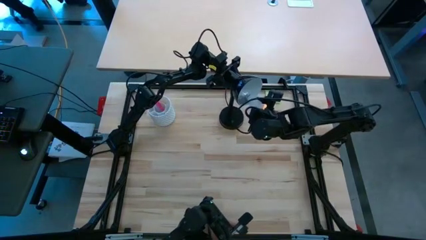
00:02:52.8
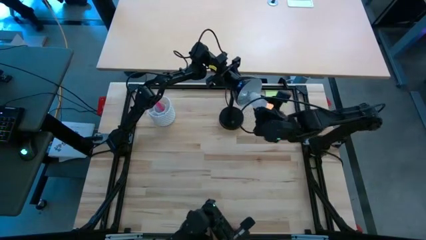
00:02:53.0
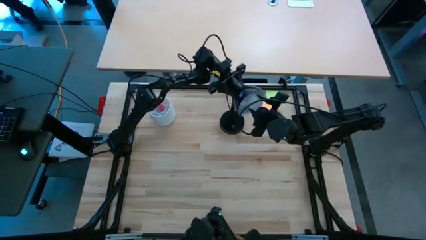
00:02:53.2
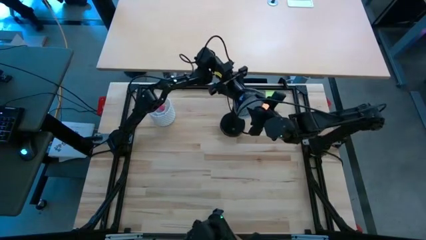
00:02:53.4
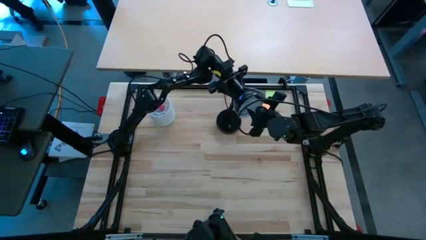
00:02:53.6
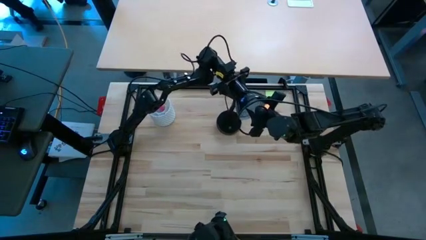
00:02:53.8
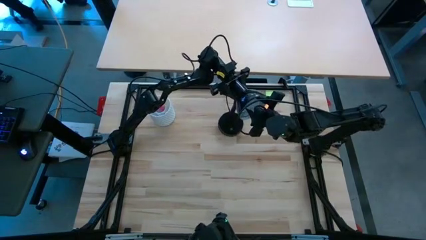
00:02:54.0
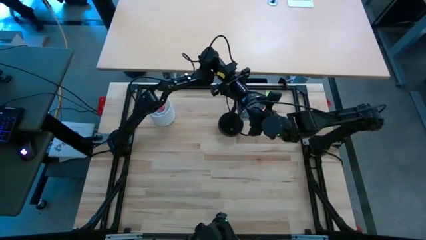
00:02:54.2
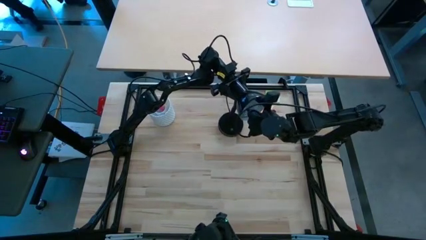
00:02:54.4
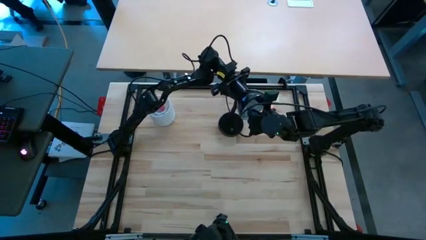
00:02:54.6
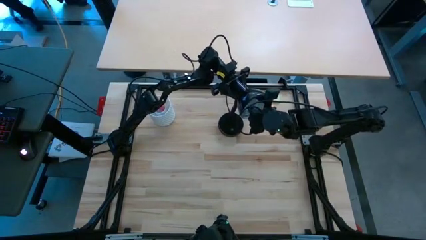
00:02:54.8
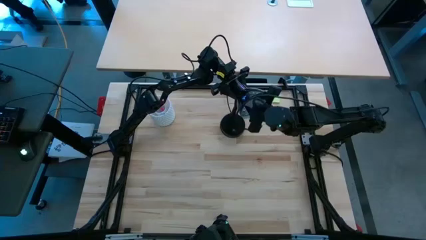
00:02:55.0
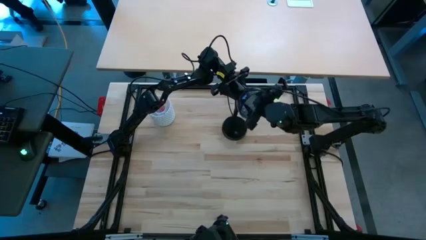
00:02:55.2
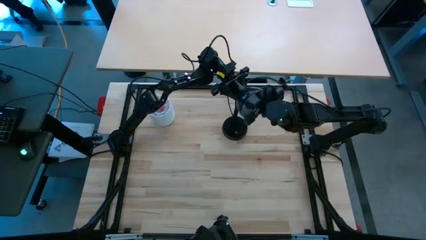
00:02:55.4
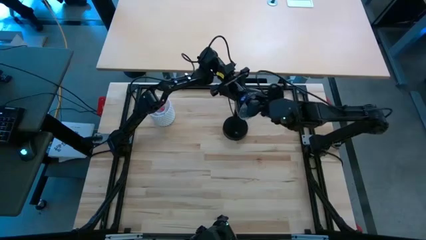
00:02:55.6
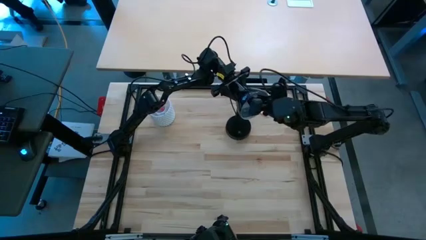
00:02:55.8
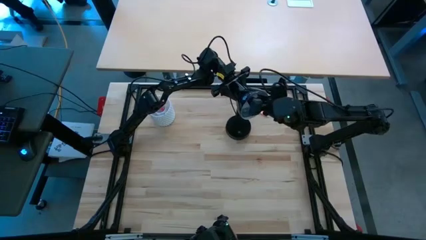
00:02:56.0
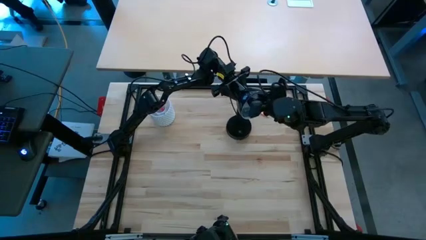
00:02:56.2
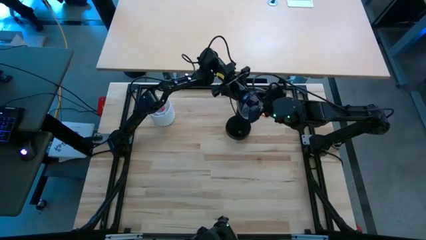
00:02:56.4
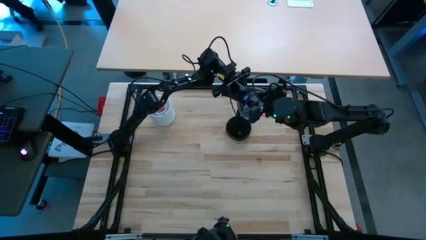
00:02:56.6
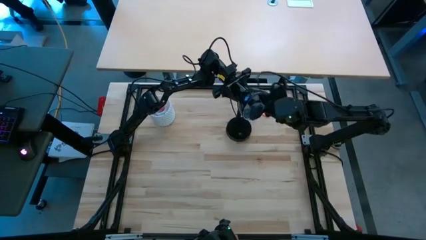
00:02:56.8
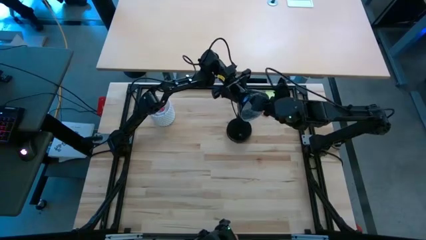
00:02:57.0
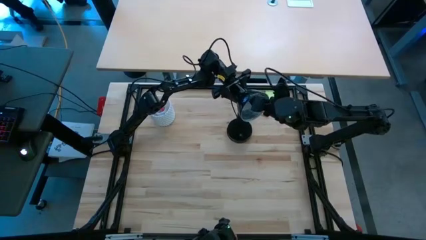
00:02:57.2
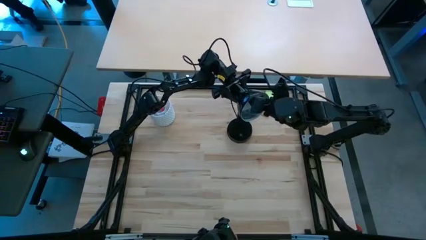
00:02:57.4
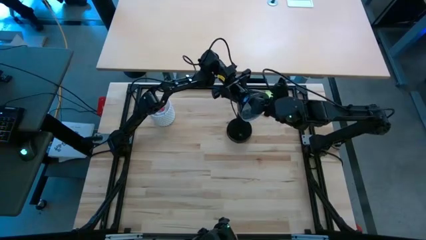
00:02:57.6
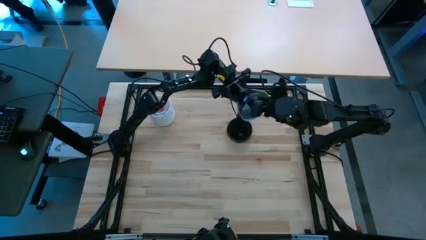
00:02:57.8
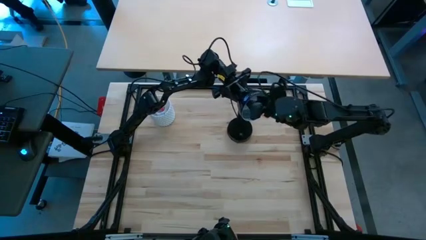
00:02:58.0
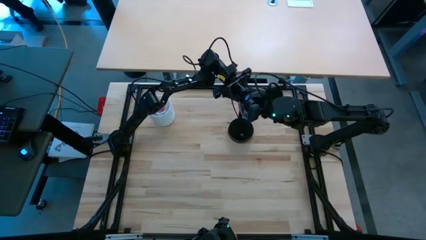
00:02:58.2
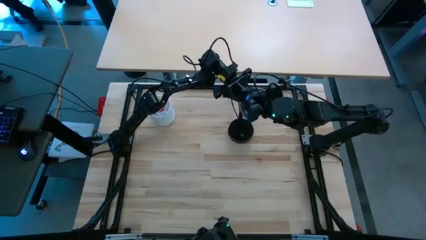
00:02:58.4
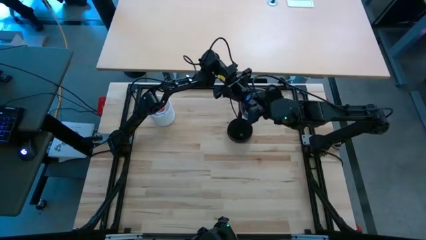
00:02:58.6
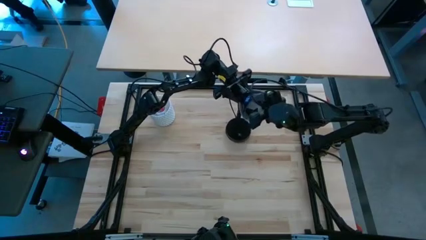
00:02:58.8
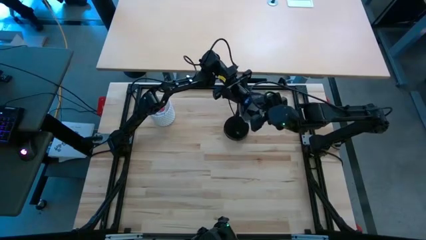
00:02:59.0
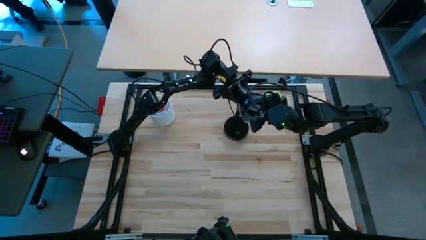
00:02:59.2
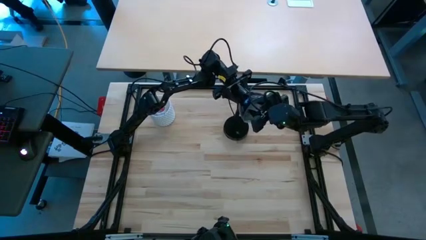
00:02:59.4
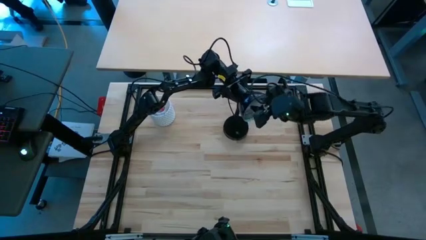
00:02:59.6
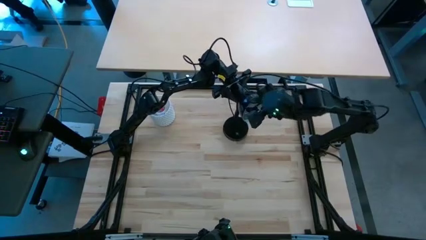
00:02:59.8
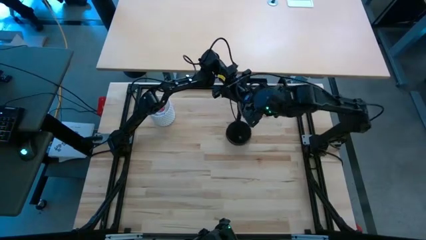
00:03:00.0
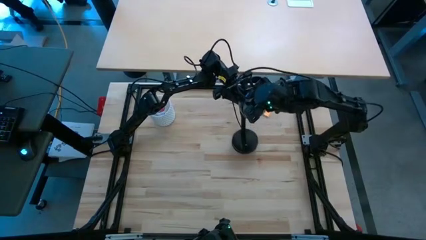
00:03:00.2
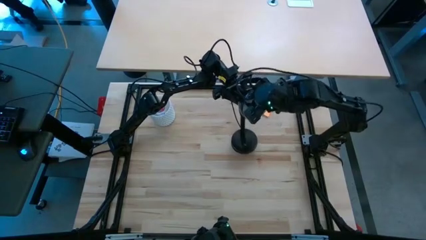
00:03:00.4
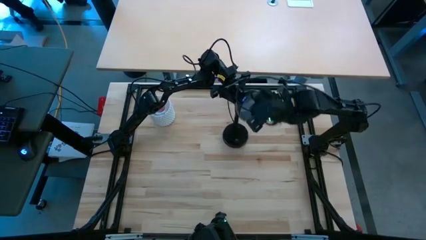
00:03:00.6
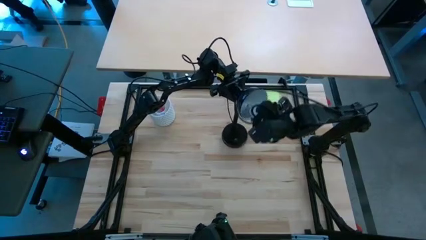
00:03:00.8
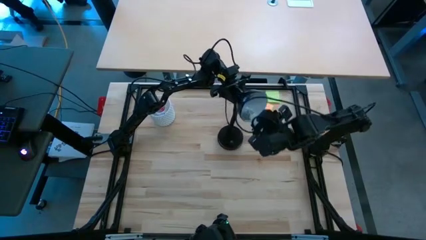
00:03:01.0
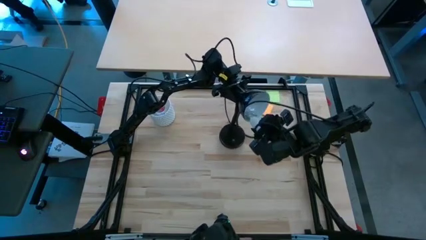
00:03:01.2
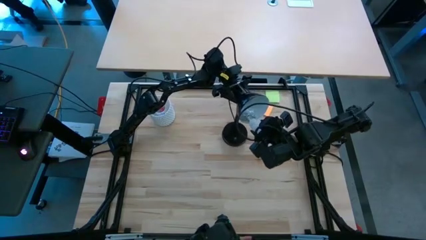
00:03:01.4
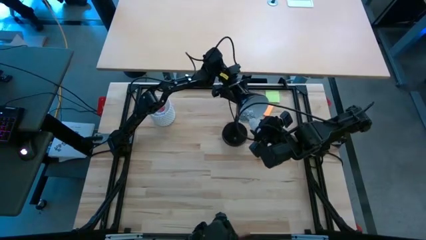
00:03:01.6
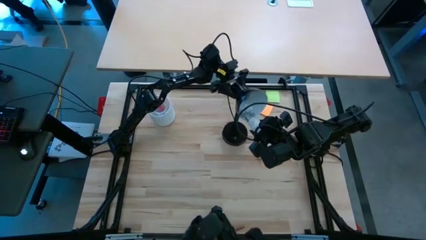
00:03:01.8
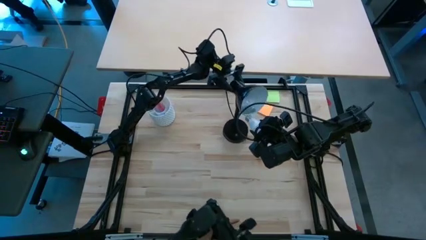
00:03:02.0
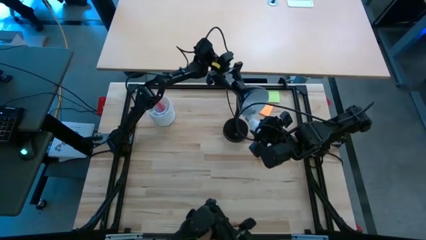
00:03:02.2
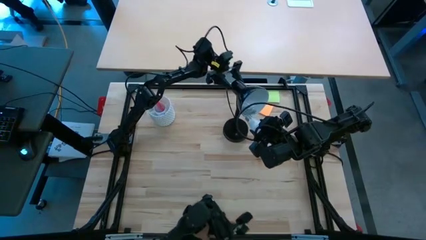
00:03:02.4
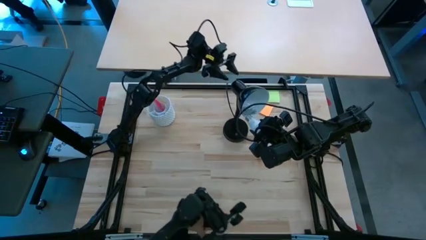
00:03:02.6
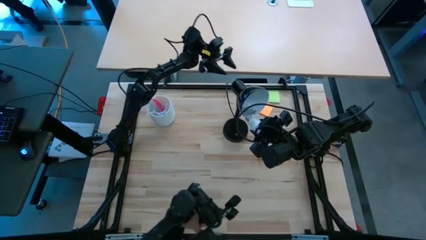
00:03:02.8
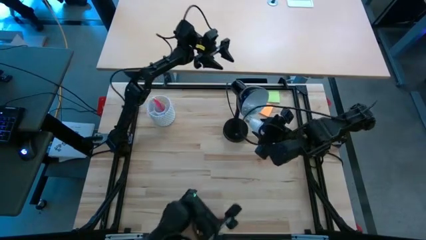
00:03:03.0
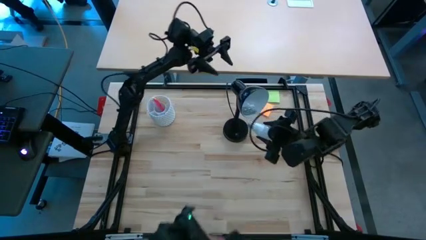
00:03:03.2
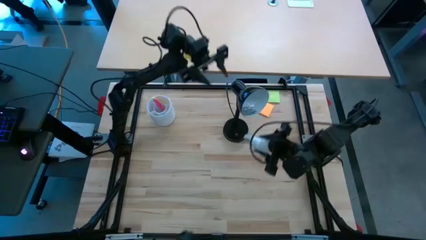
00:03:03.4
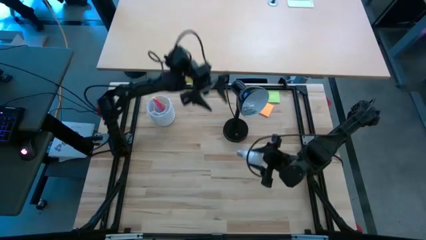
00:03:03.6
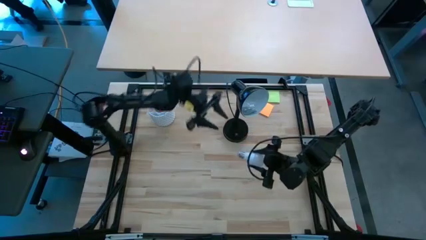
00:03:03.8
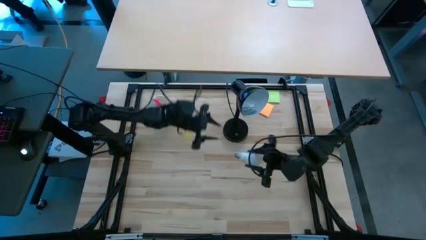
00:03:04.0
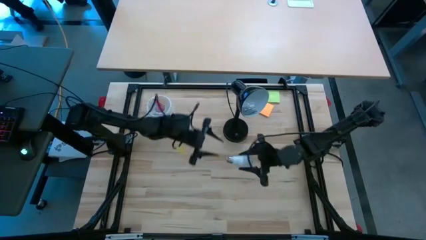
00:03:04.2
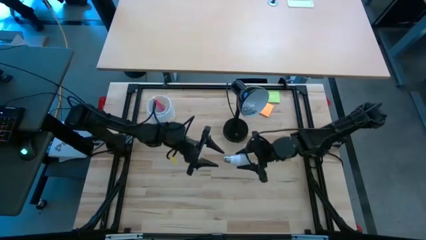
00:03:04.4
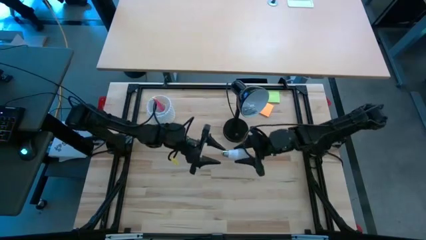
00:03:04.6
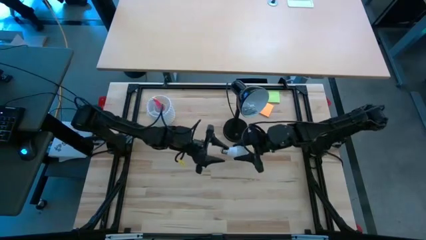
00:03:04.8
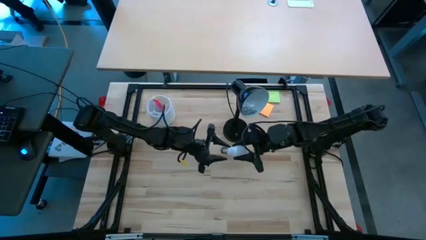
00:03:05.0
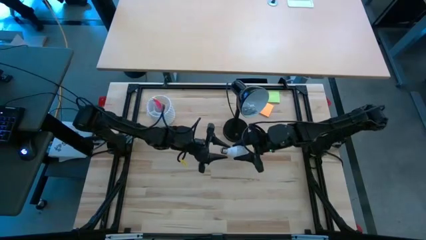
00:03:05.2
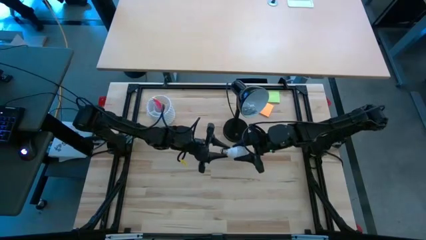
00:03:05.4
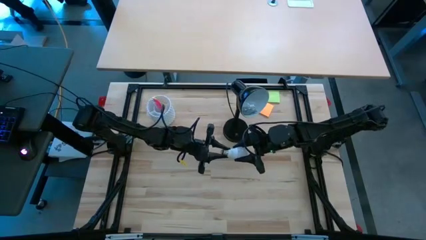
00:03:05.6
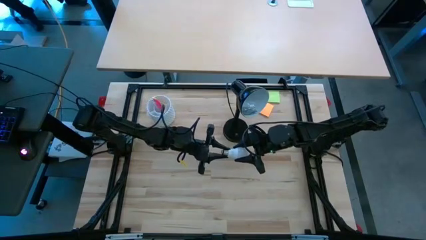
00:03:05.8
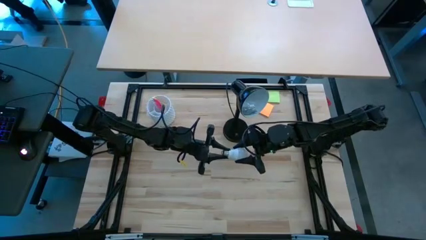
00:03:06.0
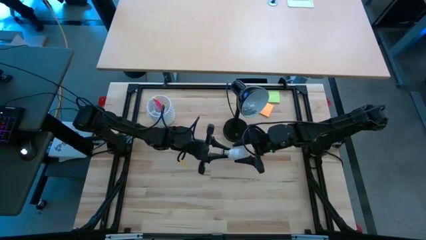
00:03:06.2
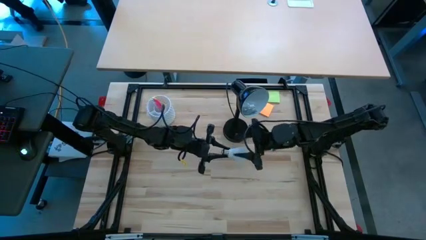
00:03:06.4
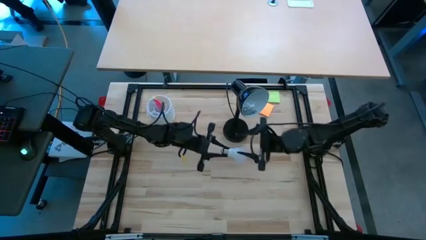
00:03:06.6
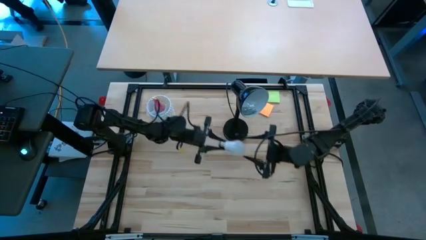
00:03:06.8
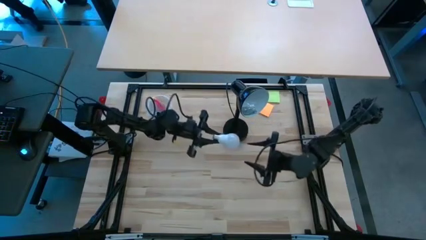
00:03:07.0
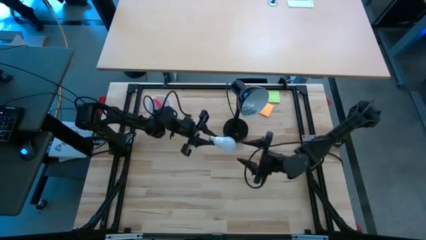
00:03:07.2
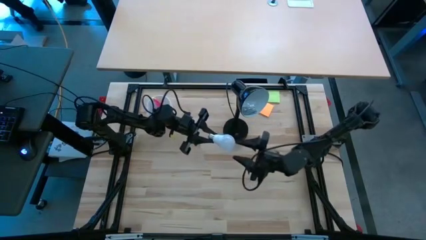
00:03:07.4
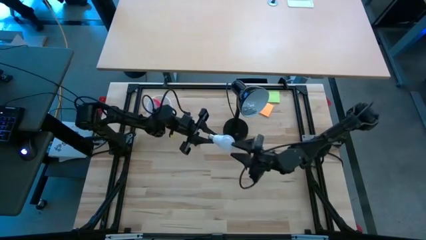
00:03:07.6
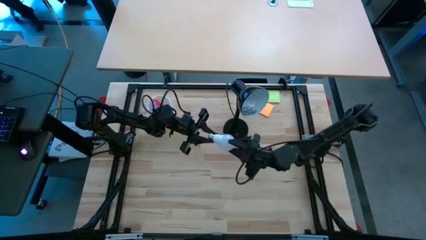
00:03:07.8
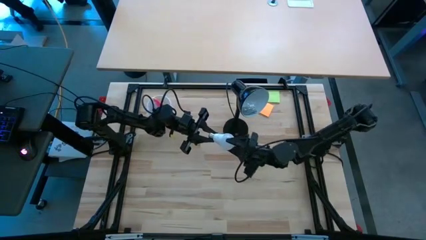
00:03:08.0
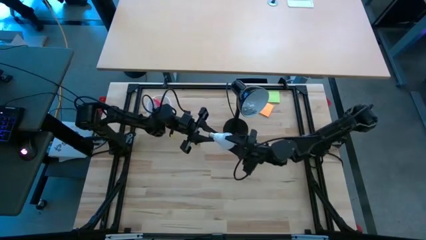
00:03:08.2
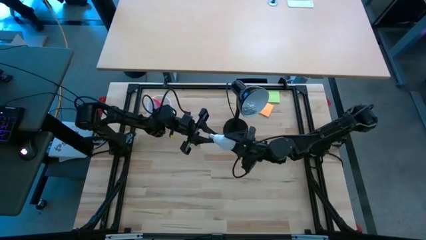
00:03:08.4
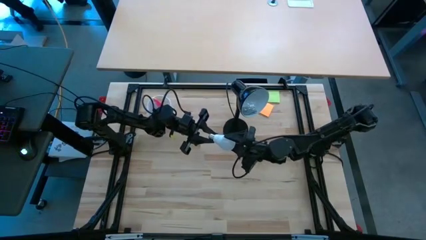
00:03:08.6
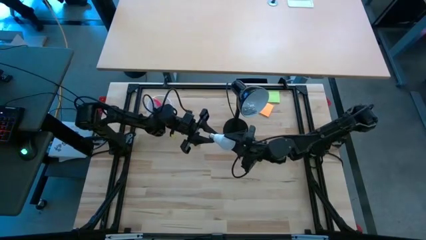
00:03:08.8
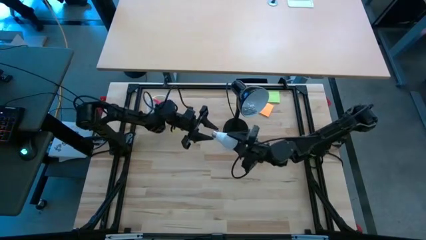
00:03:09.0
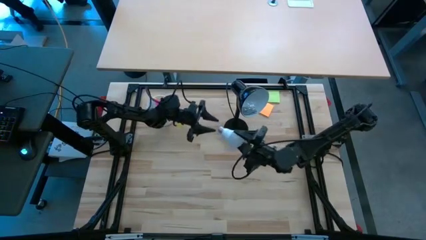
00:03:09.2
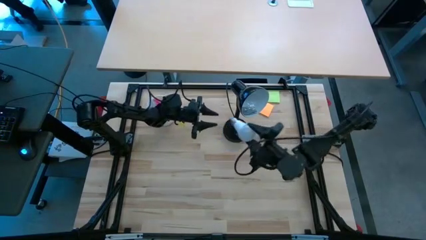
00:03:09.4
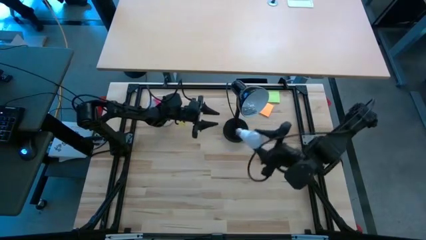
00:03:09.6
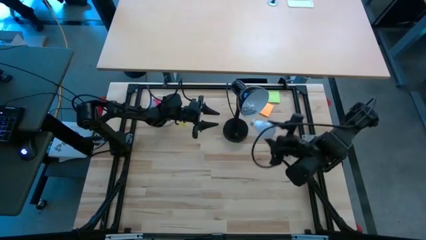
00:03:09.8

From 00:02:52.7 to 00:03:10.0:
Task: Screw lightbulb
Insert the light bulb into the desk lamp
